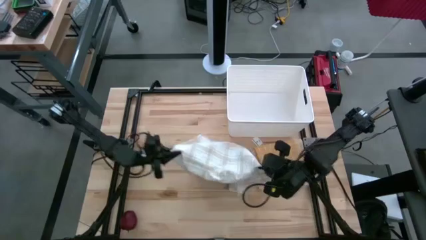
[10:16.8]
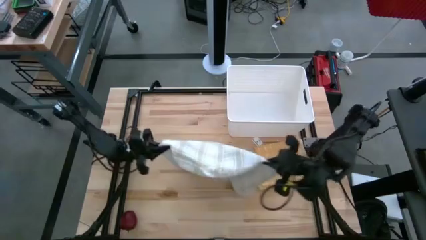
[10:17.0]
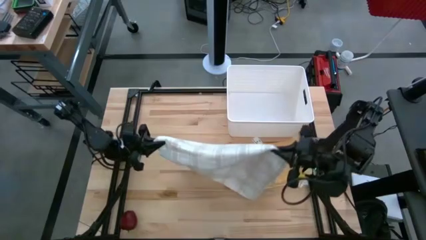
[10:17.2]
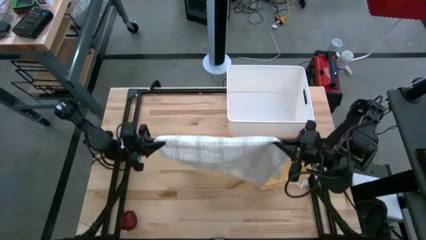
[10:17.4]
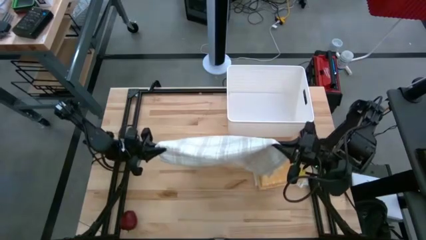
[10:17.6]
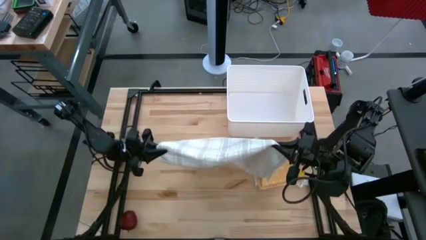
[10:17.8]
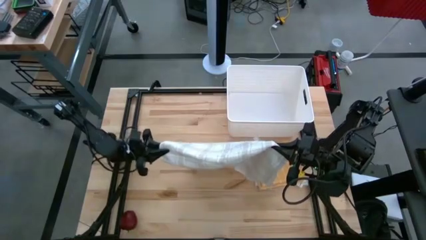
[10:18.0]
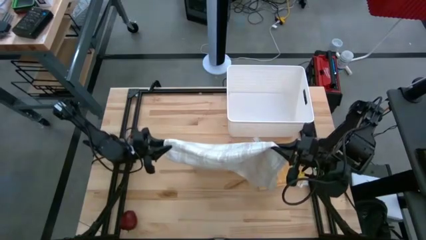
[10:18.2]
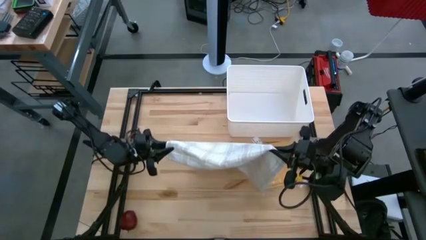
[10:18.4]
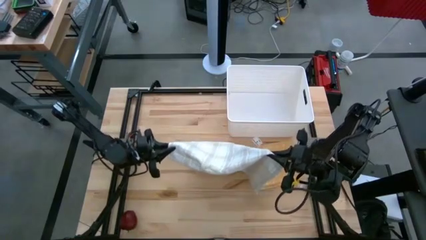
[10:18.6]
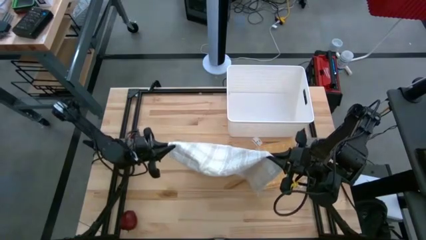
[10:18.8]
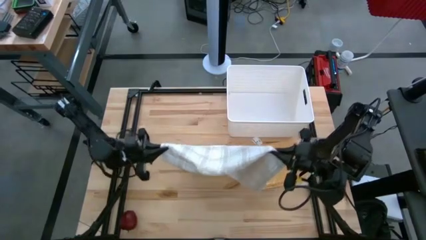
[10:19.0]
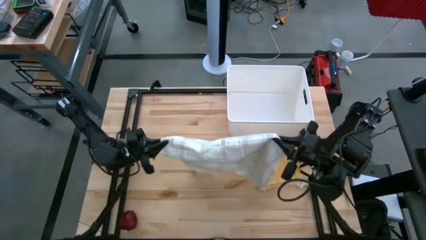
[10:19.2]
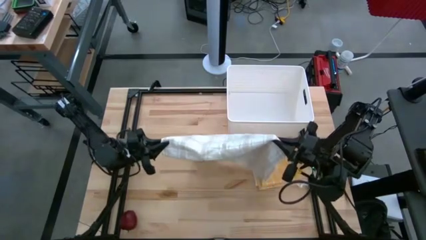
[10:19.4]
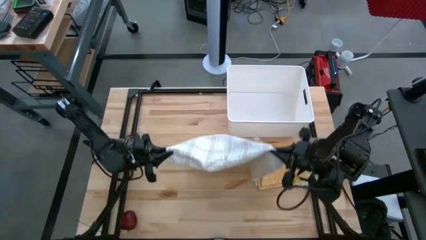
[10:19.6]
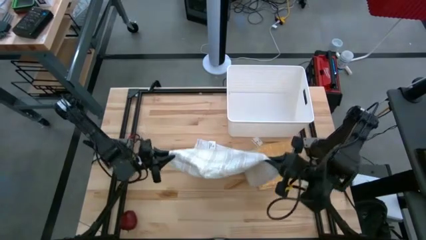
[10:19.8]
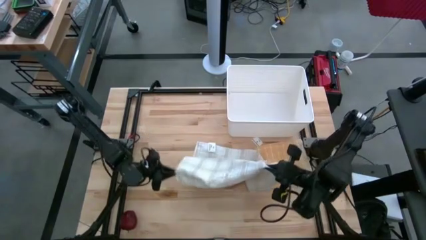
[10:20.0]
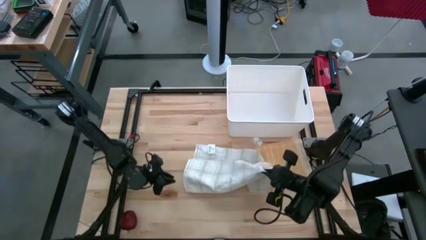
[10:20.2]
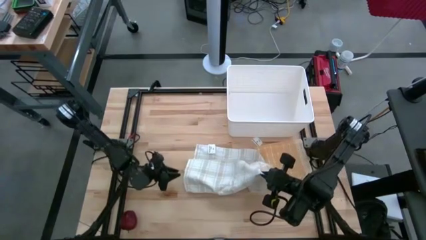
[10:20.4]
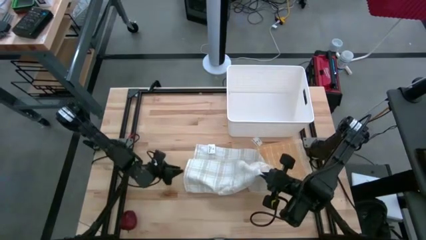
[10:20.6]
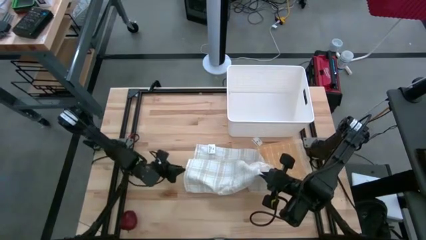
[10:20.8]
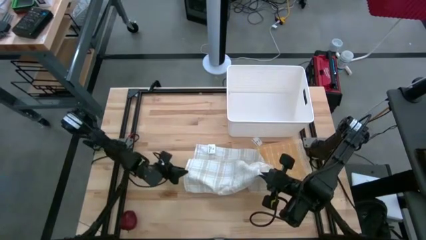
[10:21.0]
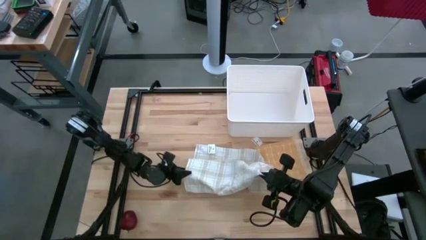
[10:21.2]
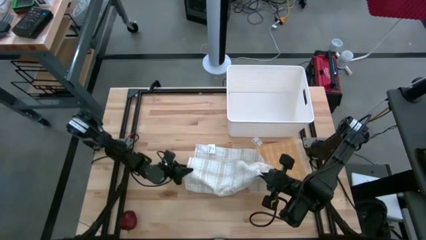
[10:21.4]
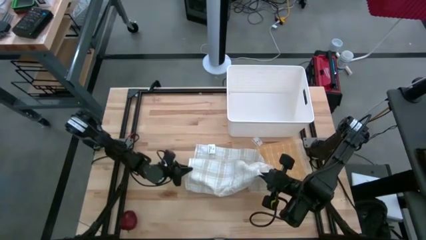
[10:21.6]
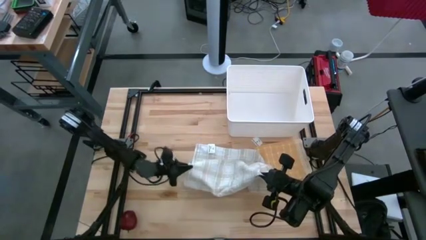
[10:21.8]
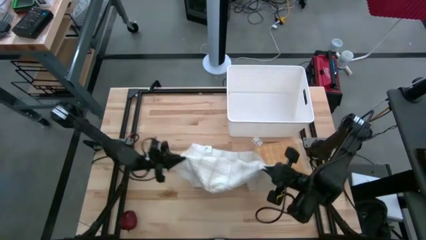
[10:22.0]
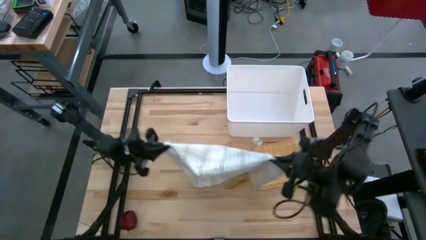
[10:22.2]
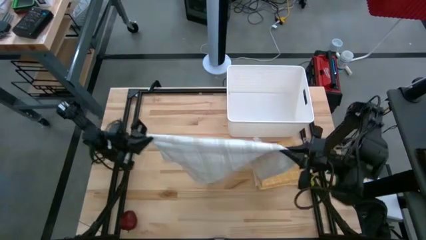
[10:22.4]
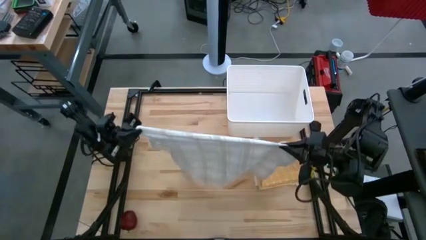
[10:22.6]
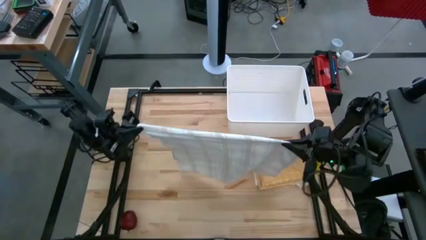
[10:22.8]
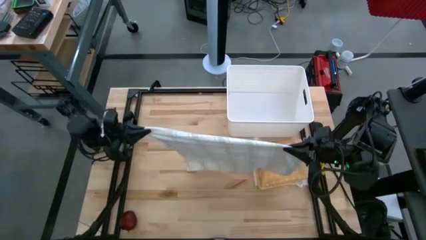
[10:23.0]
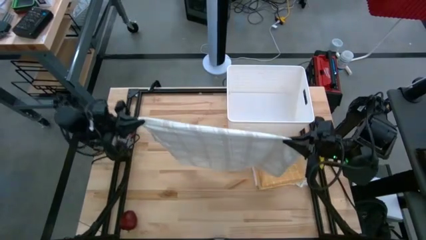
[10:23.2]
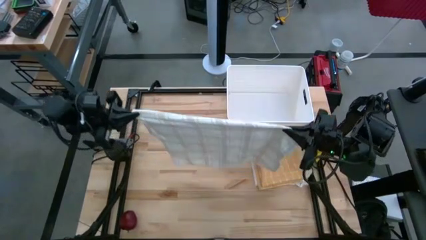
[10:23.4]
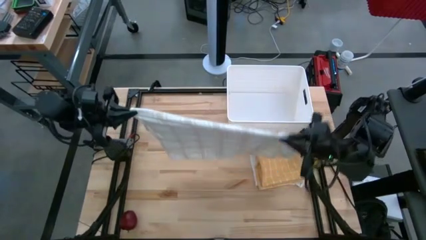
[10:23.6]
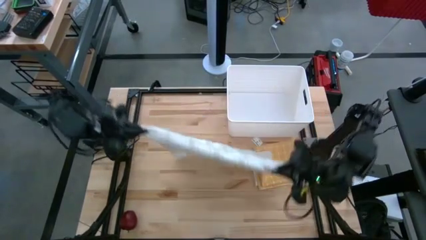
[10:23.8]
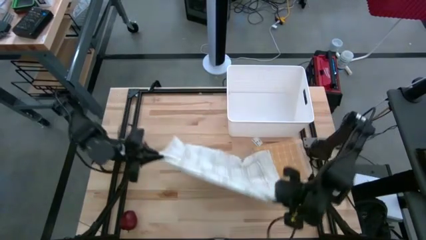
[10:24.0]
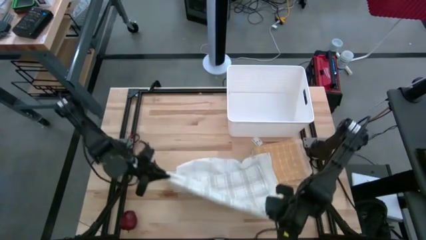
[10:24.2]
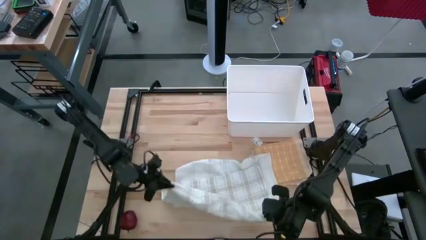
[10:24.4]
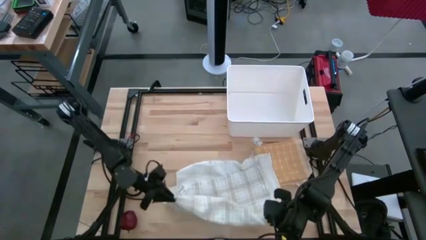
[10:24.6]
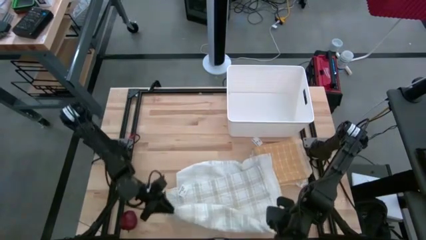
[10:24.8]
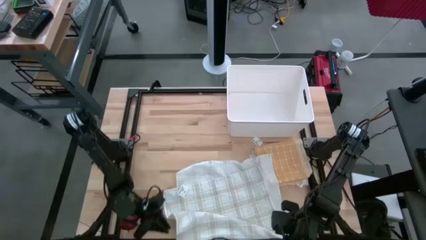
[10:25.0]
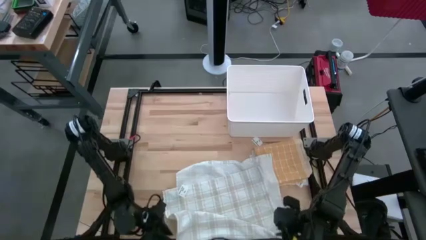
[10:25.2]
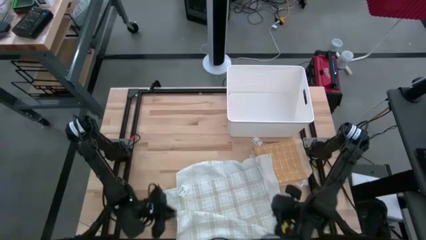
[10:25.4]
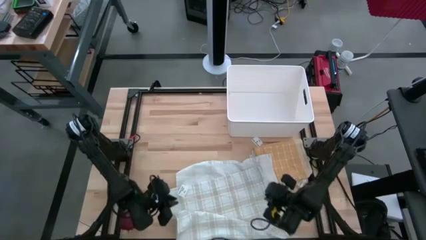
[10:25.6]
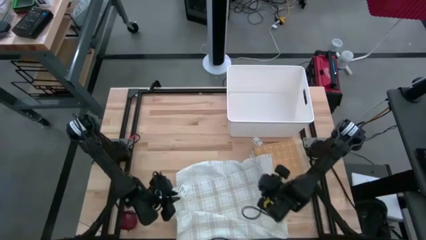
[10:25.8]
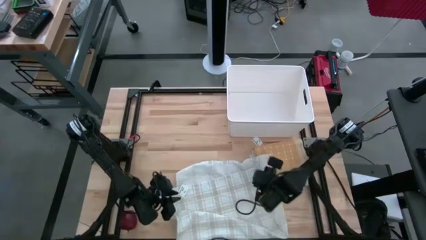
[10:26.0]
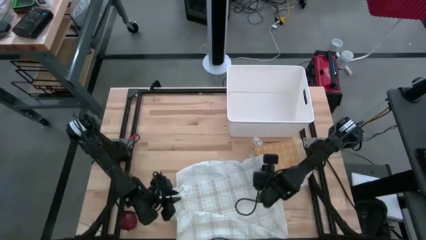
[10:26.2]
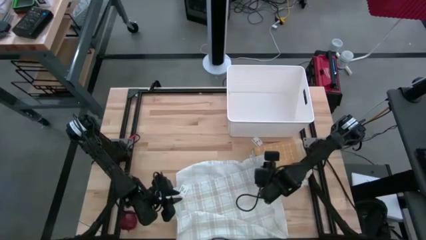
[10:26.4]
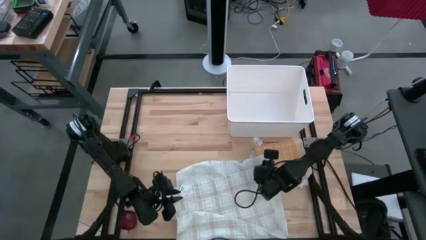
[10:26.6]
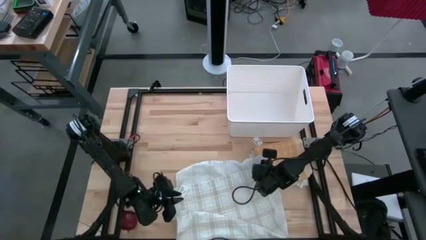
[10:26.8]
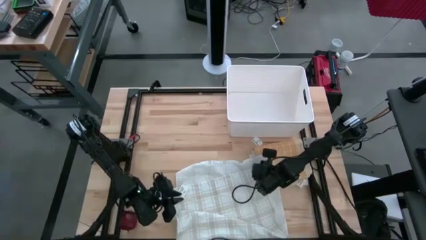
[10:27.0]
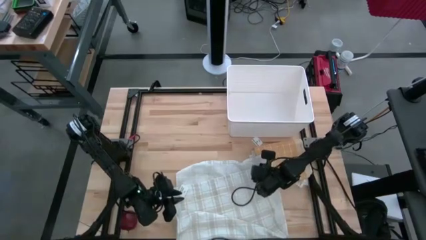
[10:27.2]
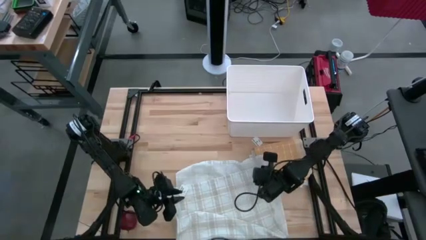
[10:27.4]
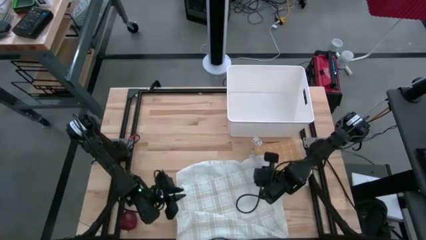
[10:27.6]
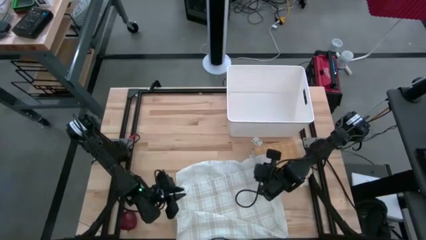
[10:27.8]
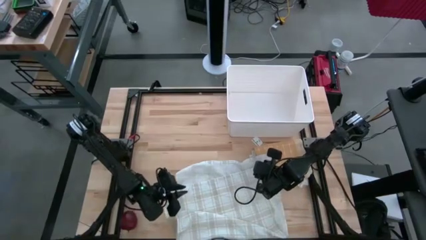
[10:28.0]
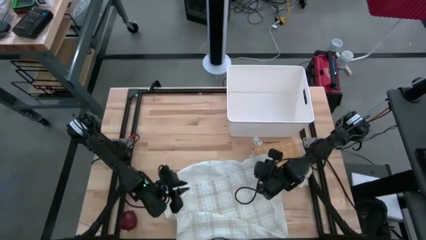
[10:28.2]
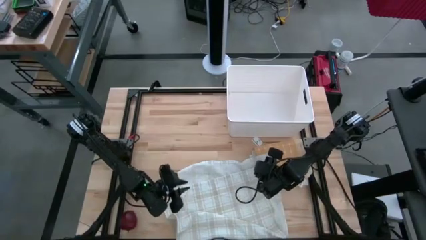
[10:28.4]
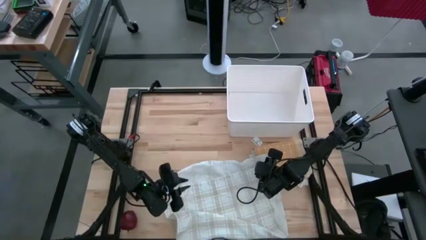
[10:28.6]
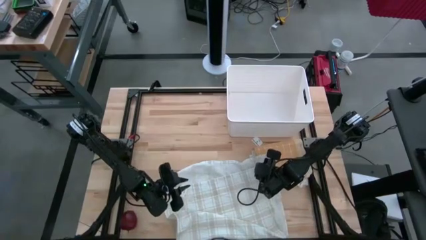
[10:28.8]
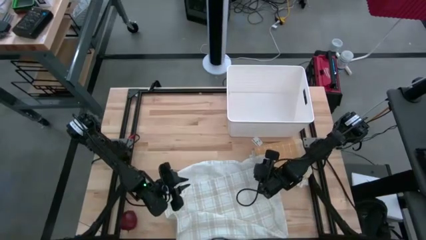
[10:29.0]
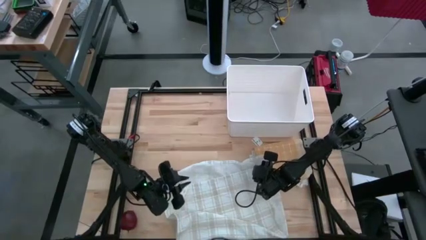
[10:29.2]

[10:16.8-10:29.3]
Task: Fold towel
Fold the white checkered towel

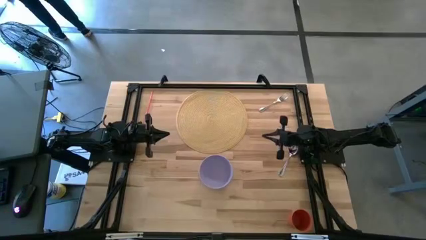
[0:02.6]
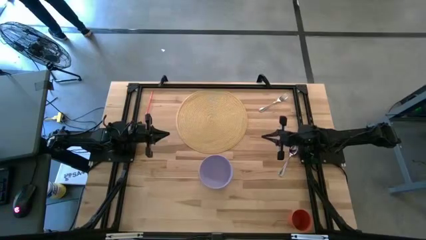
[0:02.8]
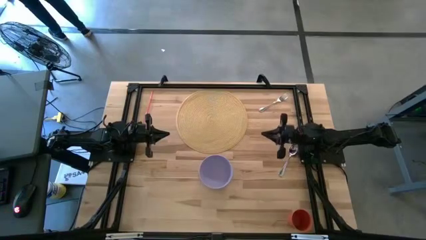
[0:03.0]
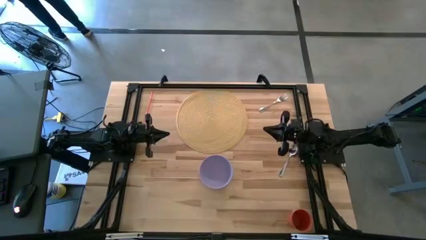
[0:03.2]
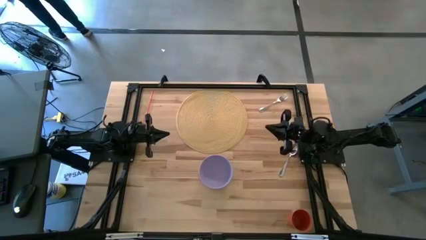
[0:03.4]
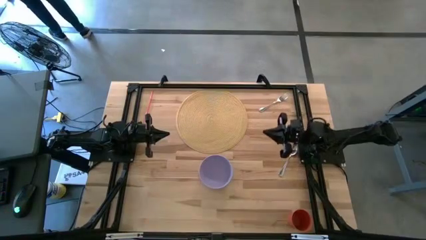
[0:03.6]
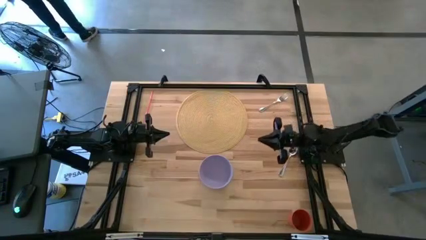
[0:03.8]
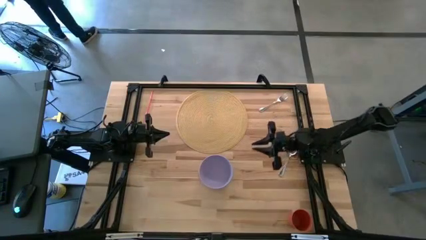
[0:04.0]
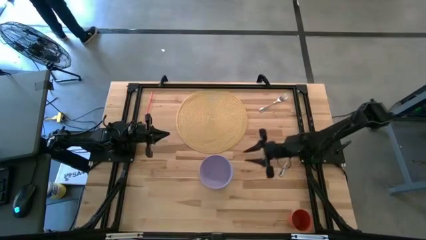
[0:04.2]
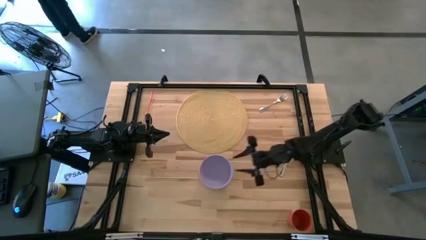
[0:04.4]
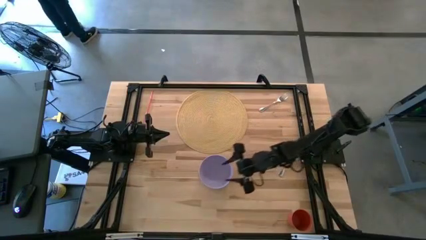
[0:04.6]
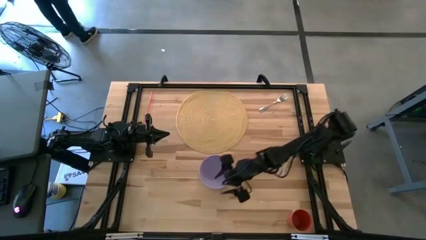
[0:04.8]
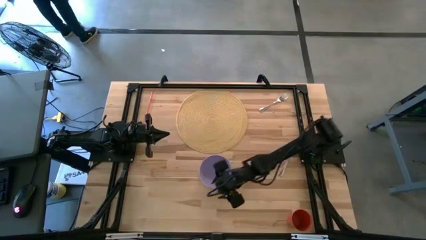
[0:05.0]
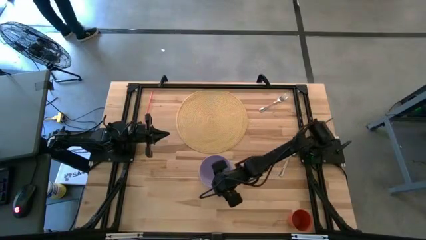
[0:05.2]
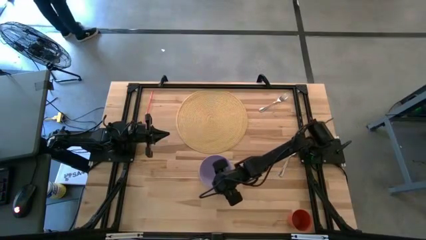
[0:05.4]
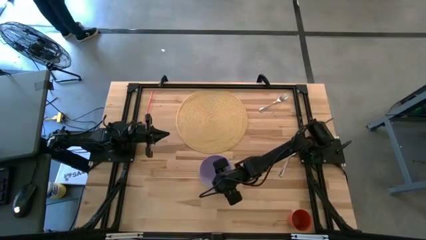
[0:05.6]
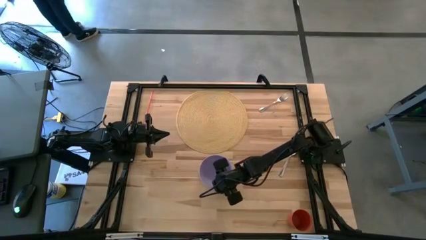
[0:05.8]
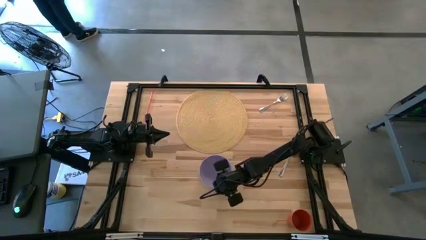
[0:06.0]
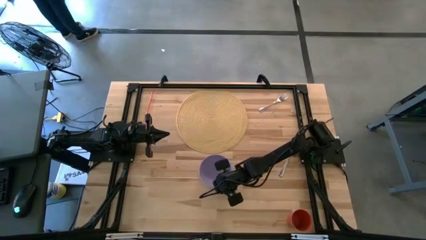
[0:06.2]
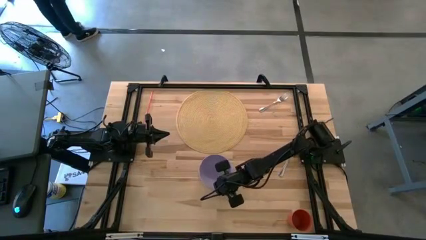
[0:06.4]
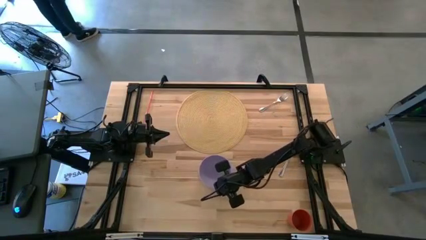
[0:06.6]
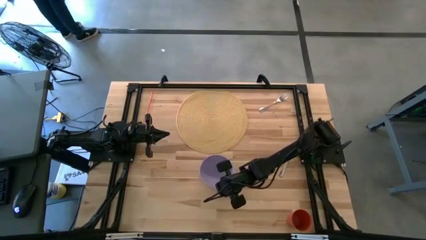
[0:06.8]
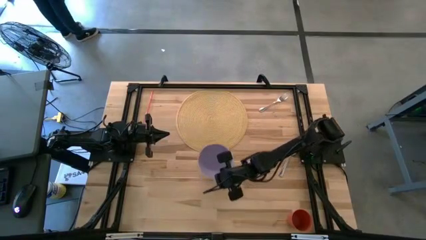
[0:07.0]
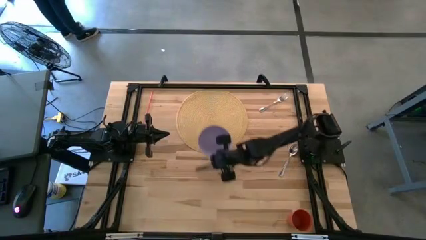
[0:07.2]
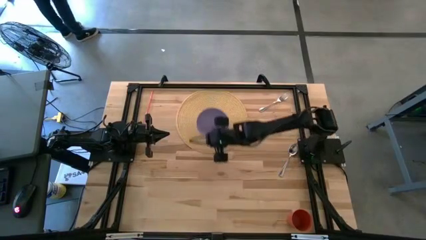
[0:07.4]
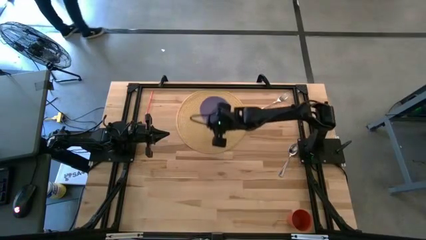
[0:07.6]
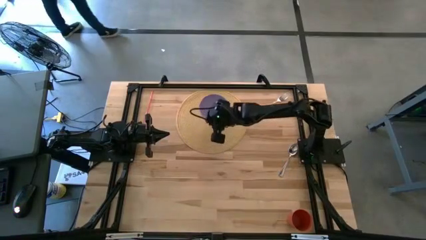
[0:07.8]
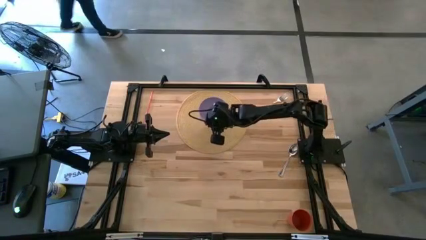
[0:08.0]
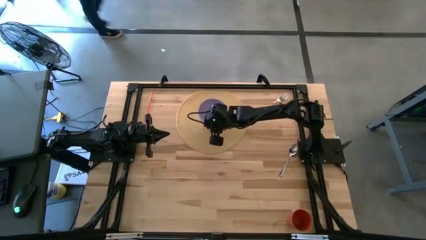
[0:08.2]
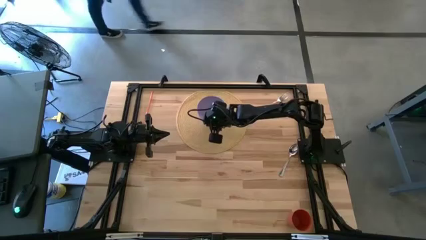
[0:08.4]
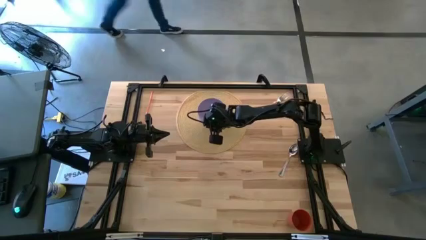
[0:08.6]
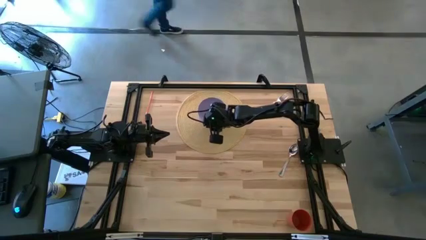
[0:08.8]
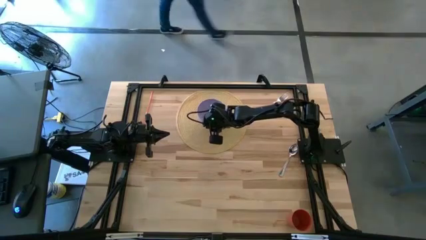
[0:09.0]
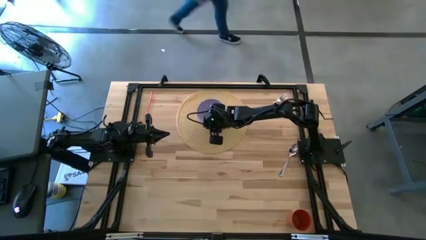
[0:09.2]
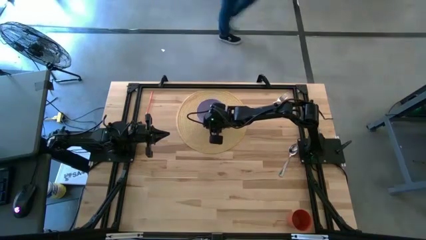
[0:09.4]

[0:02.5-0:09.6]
Task: Pick & Place Utensil
Put the purple bowl on the yellow placemat
